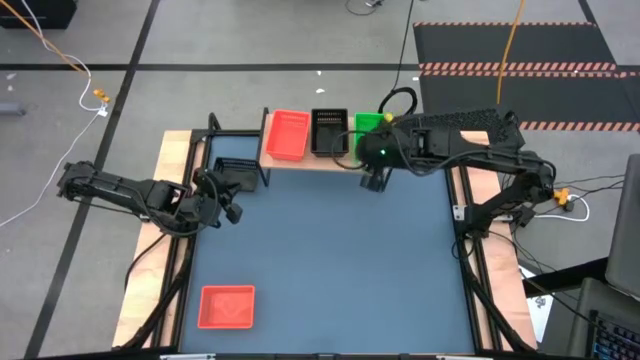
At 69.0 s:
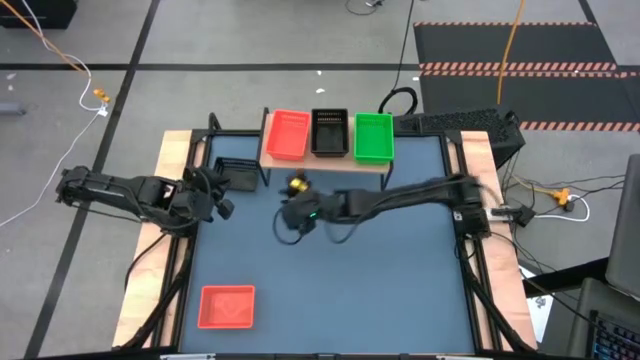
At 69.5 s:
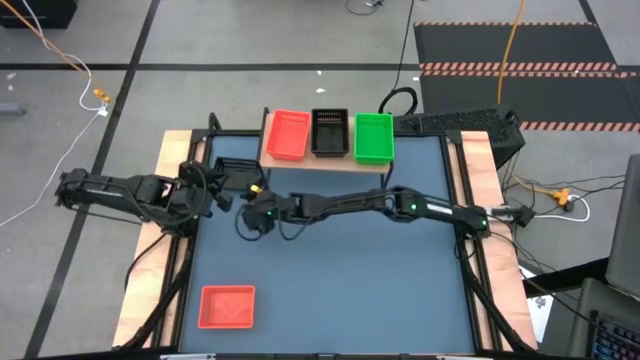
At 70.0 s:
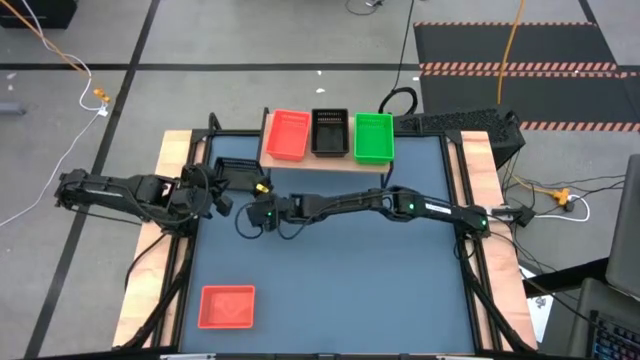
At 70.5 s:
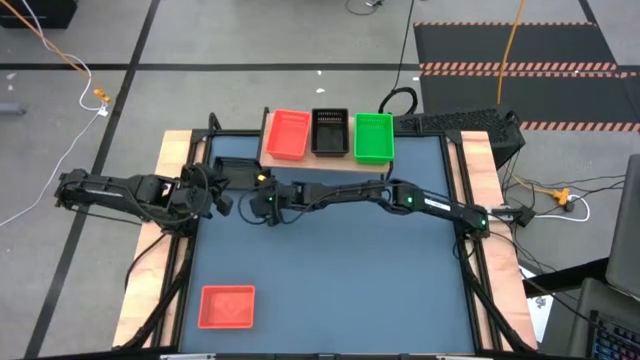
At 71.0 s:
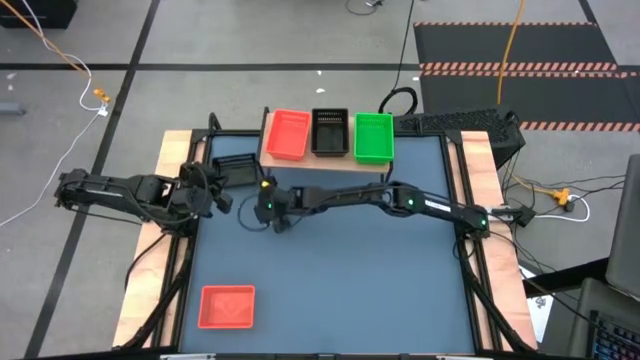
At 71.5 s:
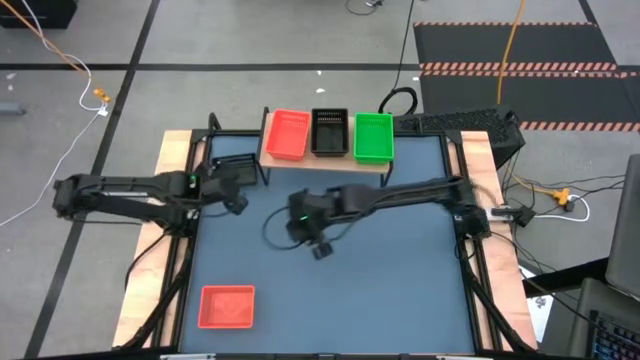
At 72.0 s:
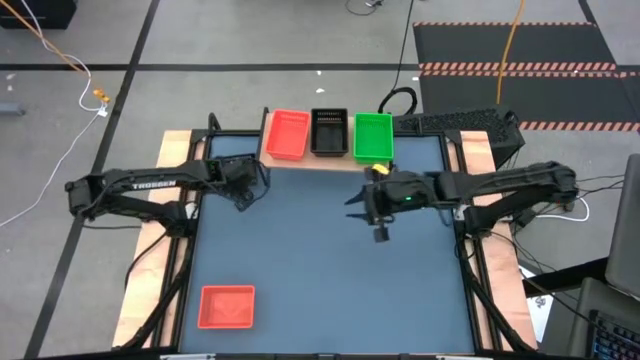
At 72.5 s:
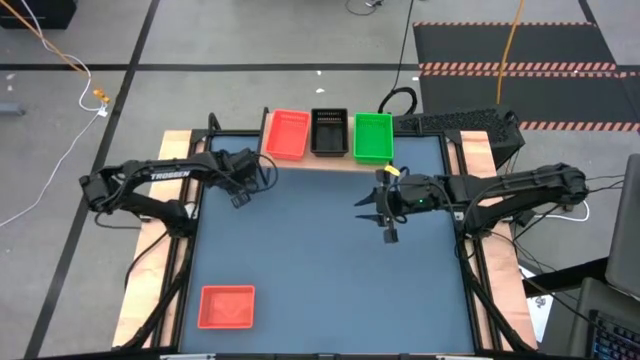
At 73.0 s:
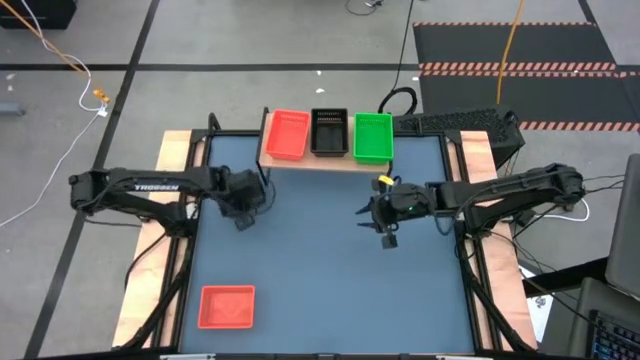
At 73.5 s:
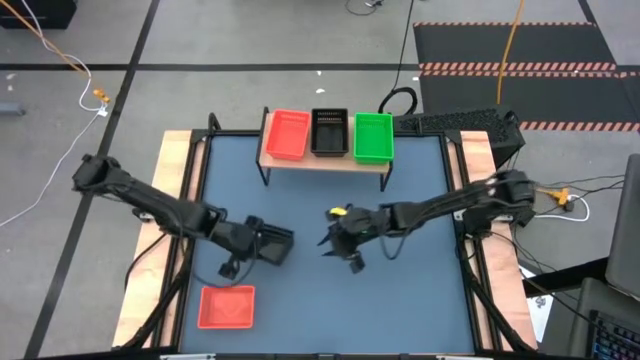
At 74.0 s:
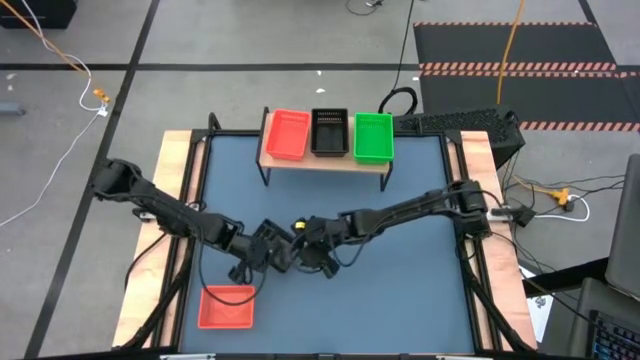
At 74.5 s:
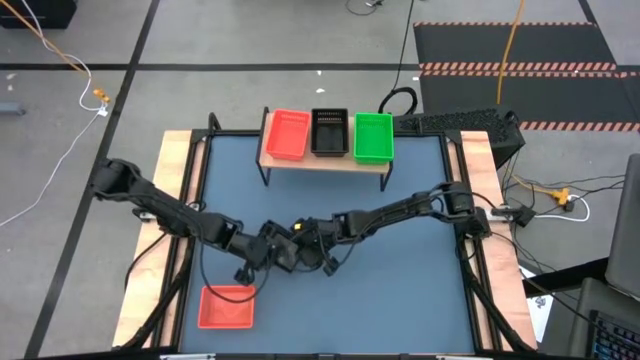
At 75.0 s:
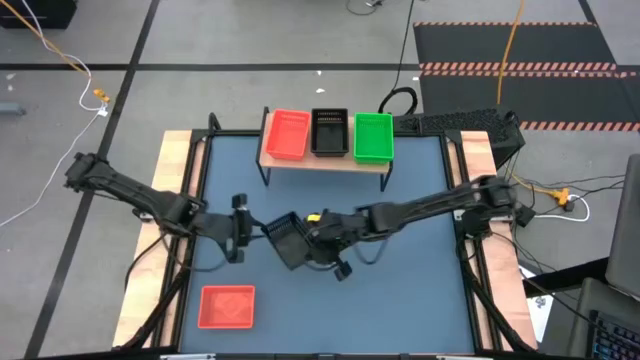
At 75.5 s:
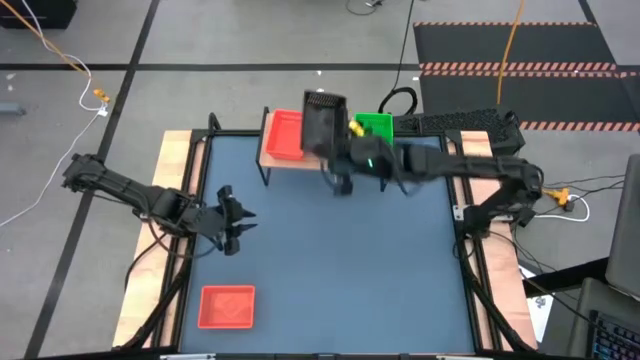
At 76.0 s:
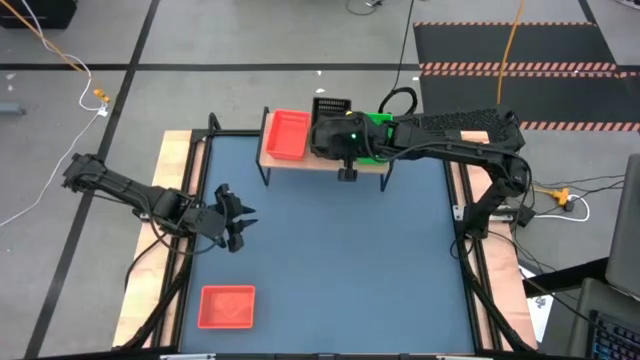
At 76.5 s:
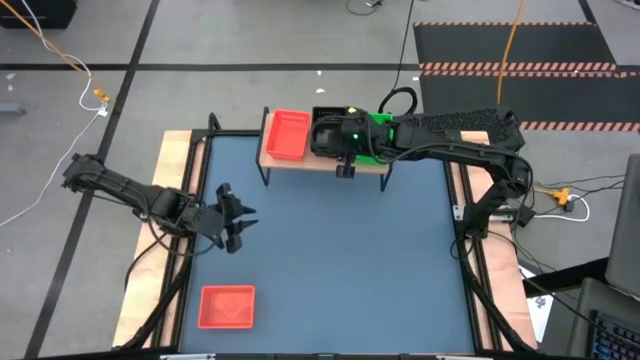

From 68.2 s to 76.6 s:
Task: Stack baskets on shelf by color
Stack the black bin on top of the black bin on the shelf

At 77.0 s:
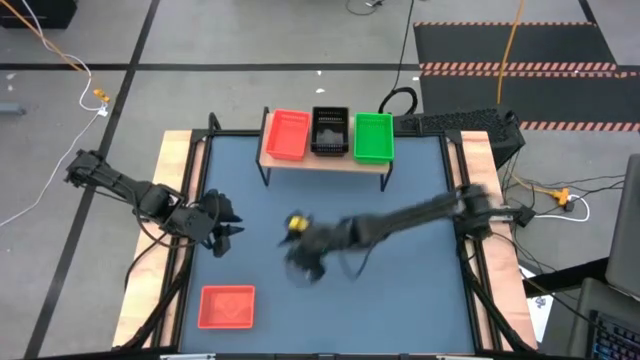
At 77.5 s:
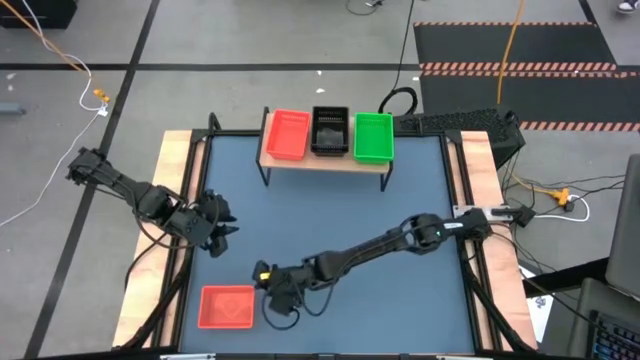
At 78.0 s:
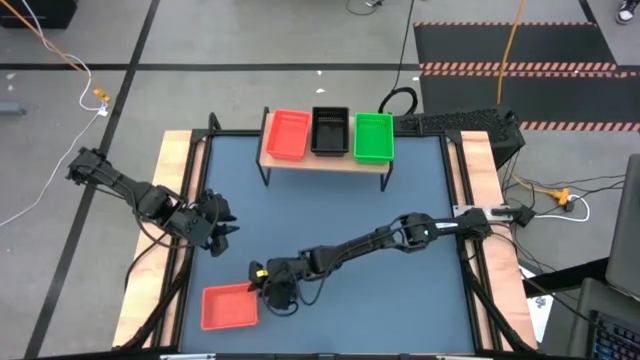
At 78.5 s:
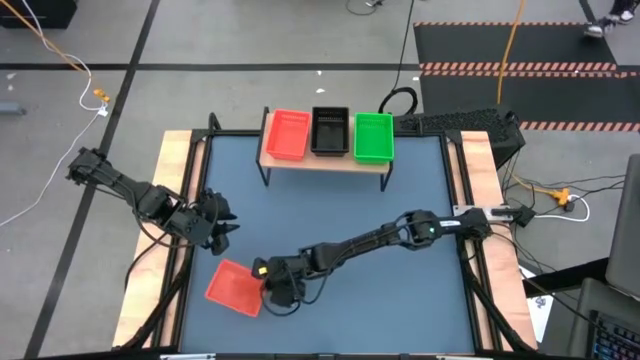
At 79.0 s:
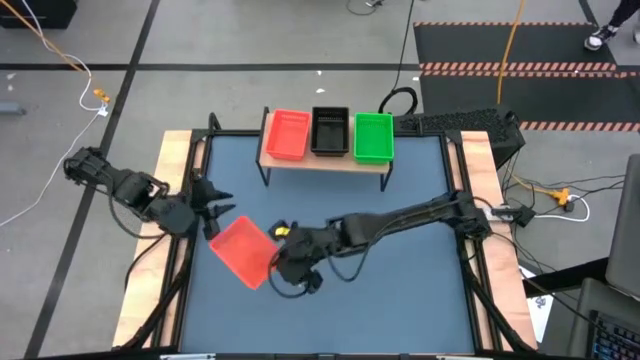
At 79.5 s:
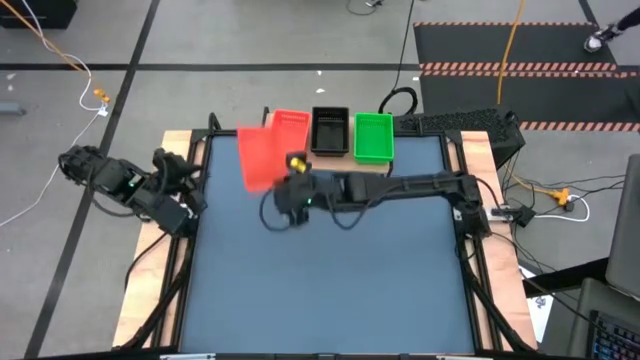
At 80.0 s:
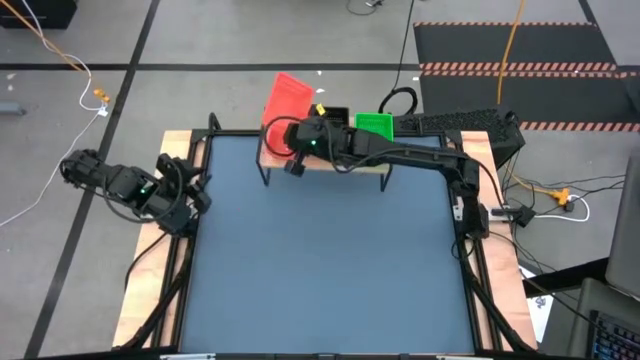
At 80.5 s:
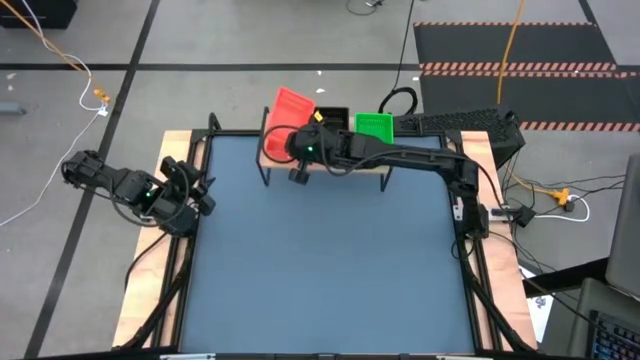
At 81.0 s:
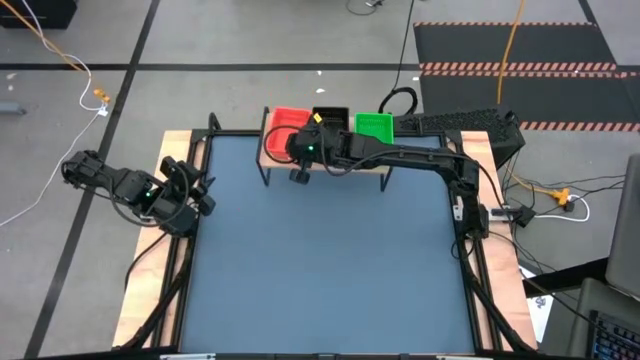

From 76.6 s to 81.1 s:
Stack the orange bin on top of the orange bin on the shelf

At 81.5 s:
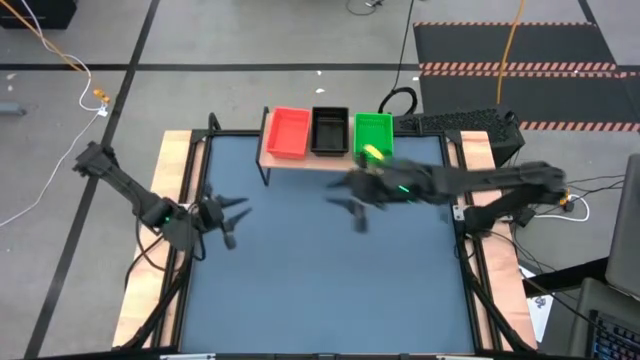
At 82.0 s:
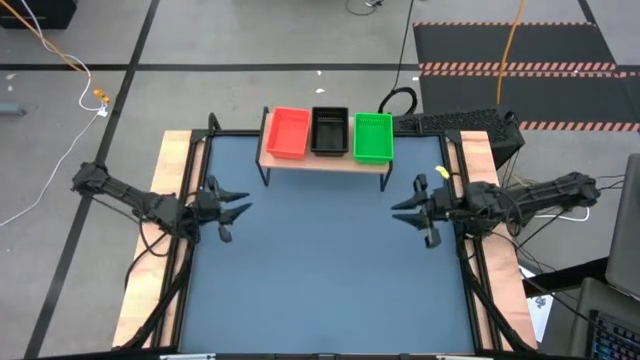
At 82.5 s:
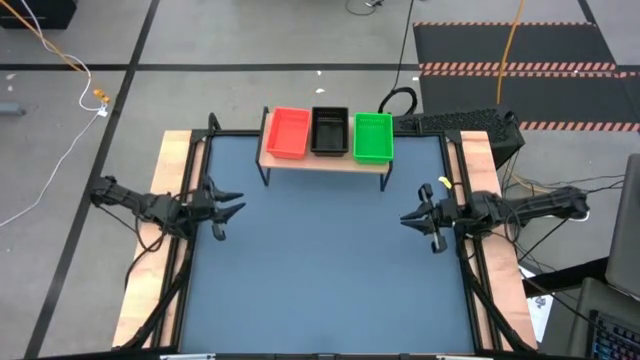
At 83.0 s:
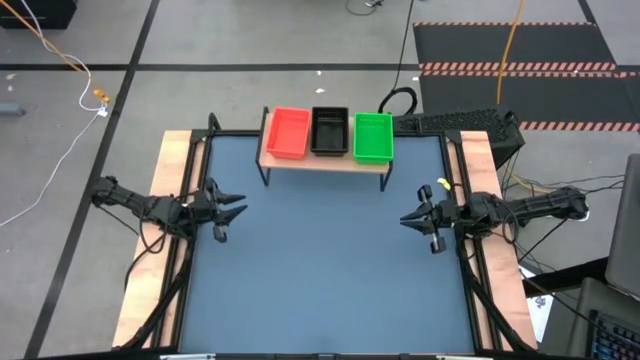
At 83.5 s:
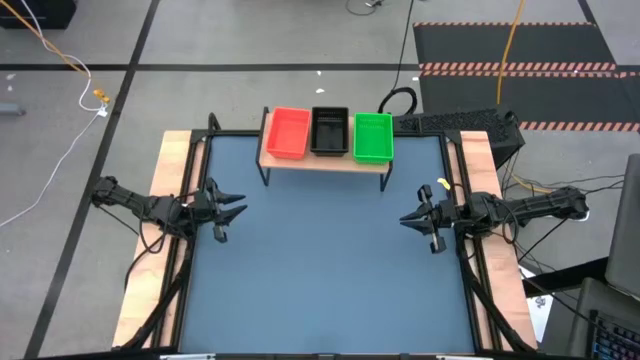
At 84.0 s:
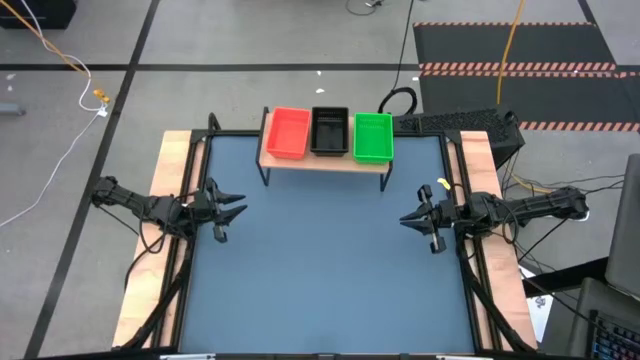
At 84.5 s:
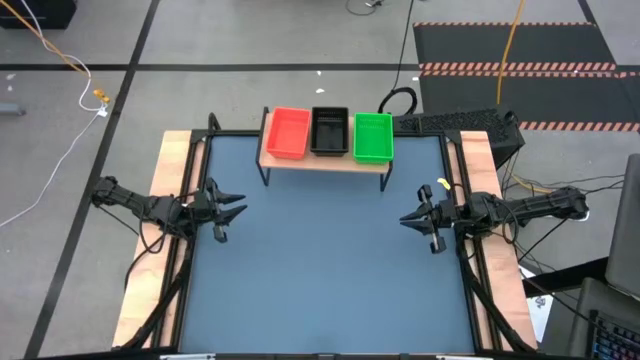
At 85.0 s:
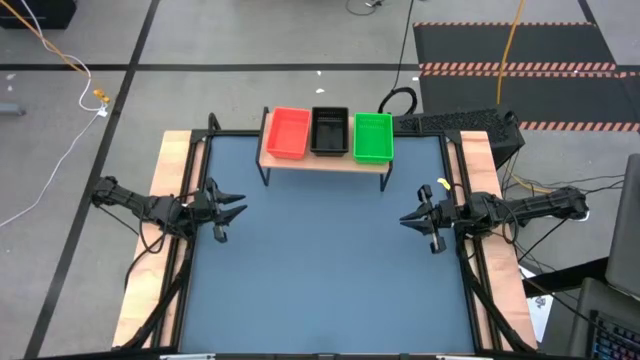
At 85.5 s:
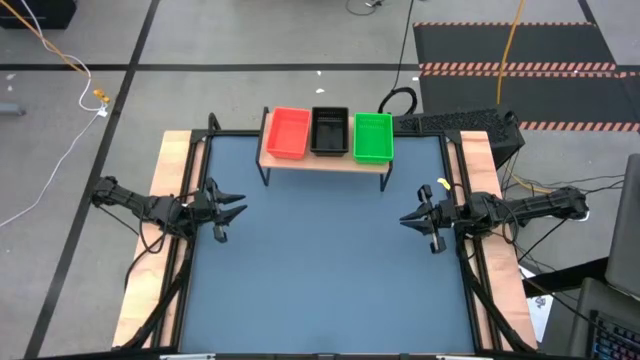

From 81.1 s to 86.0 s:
Return to Home Position

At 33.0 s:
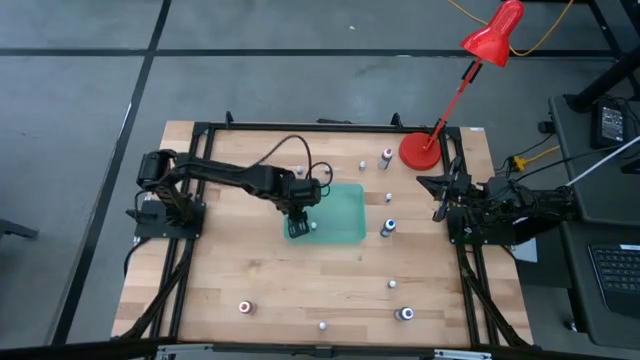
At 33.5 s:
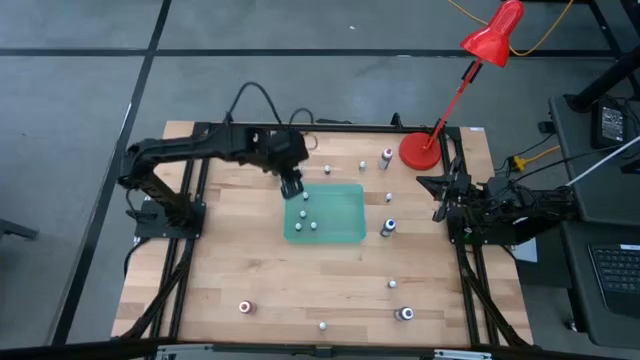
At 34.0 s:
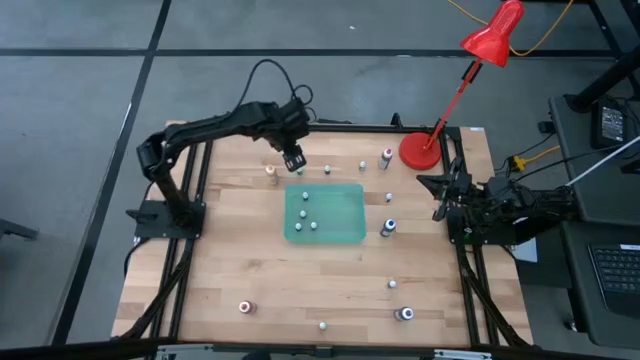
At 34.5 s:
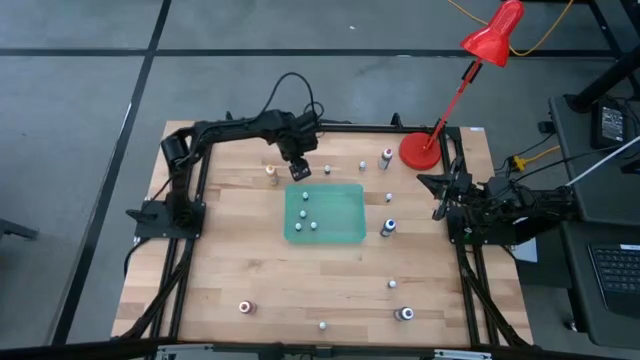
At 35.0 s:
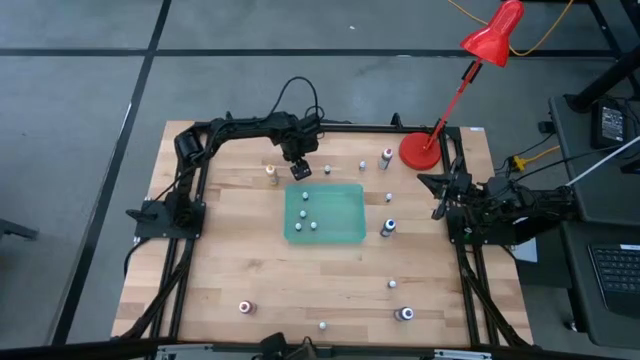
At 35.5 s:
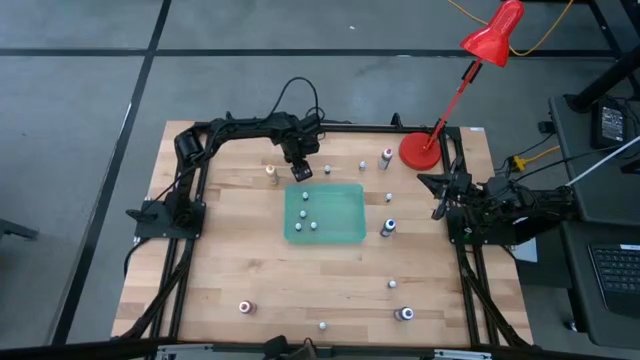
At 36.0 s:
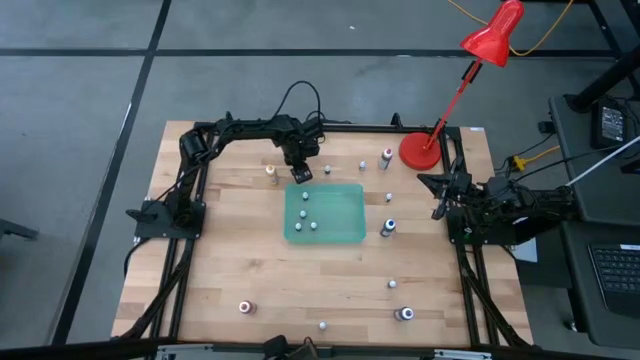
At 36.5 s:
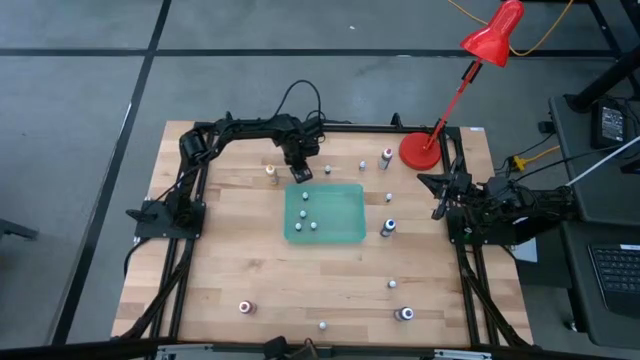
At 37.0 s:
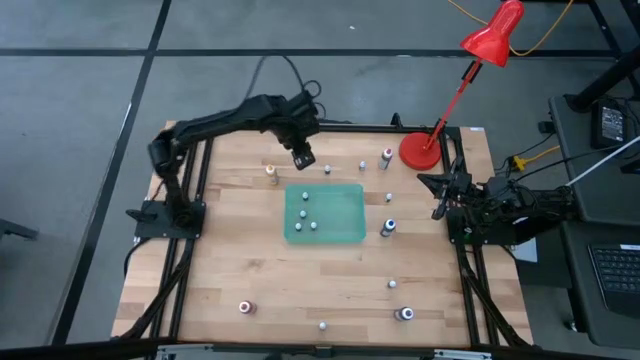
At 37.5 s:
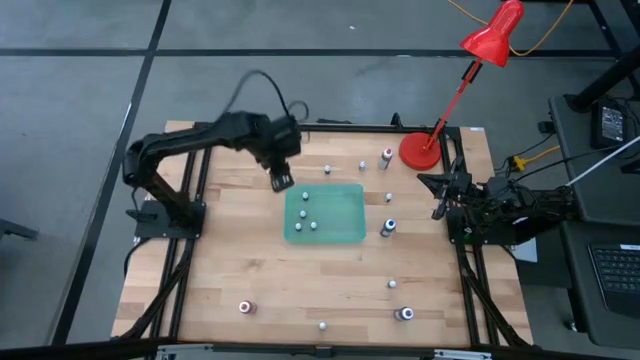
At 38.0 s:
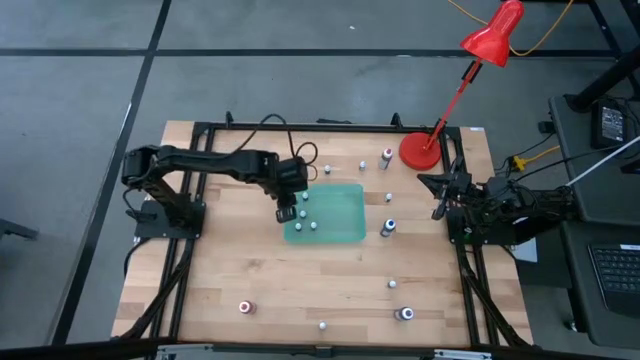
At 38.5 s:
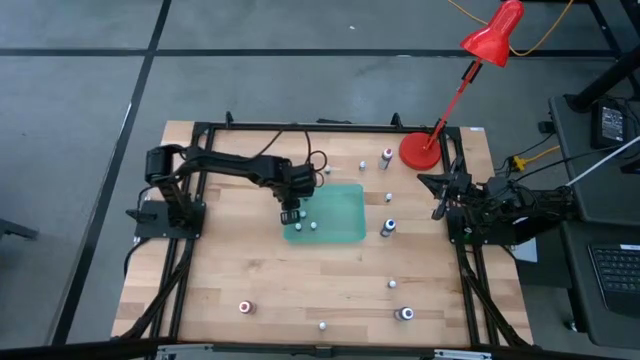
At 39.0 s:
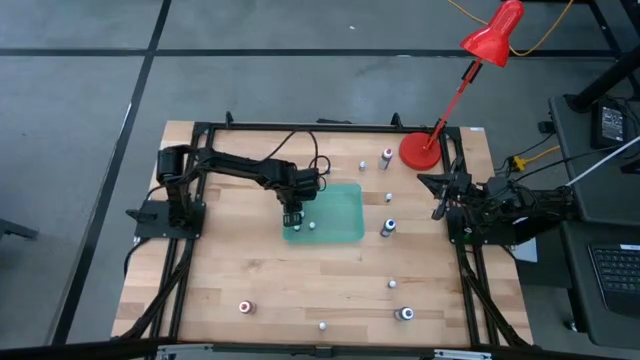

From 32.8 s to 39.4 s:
Task: Pick & Place food coloring
Put the small blue food coloring bottle into the green bin
